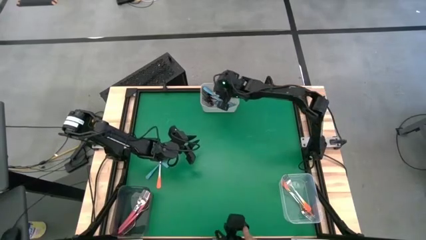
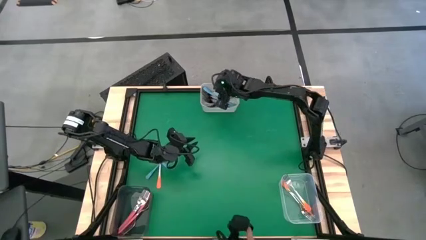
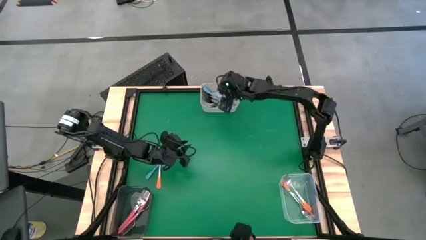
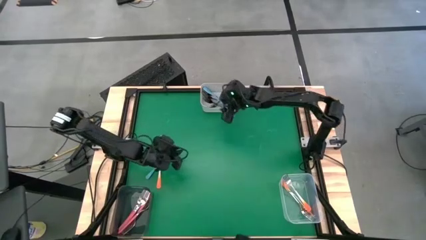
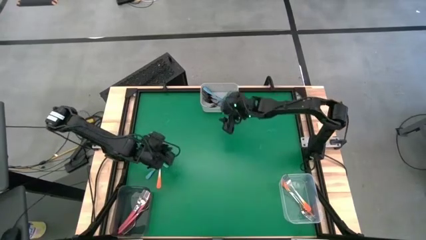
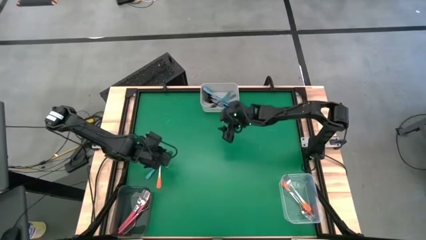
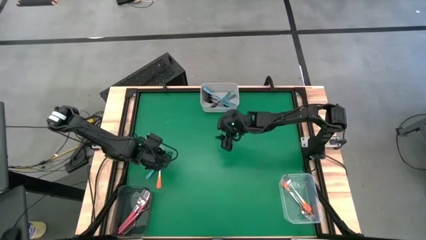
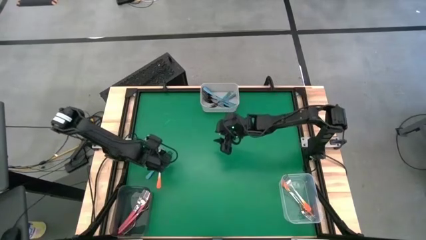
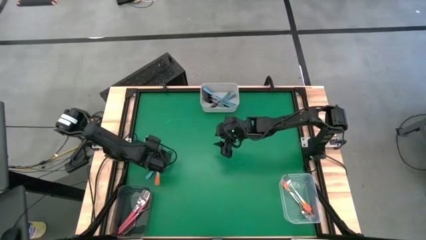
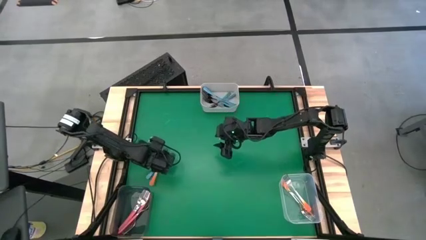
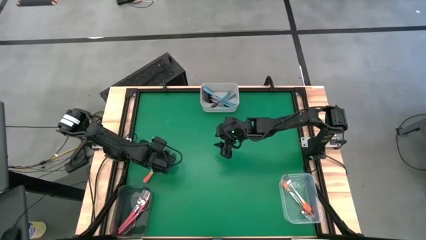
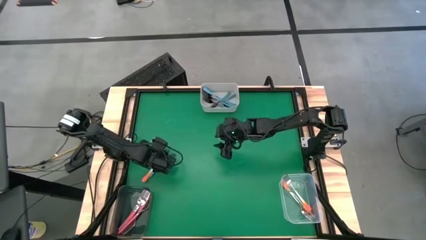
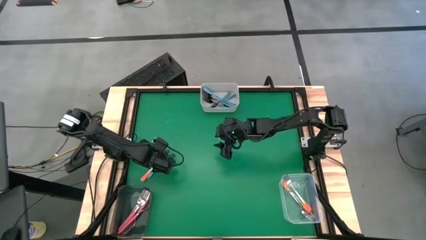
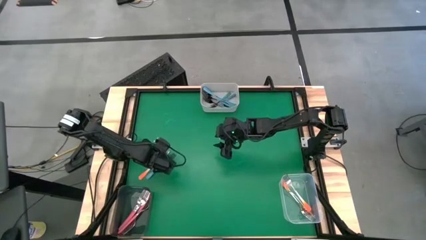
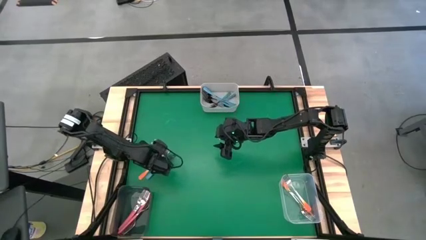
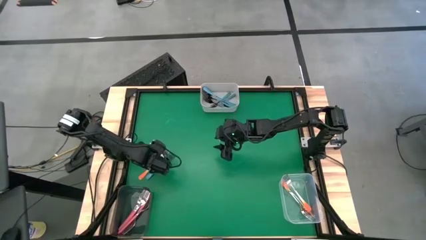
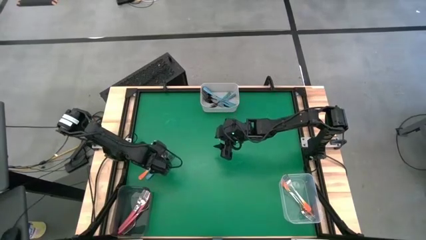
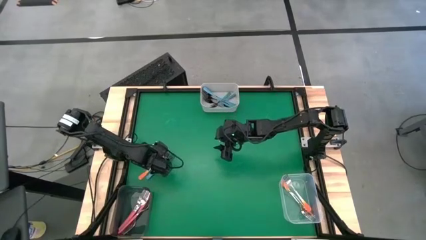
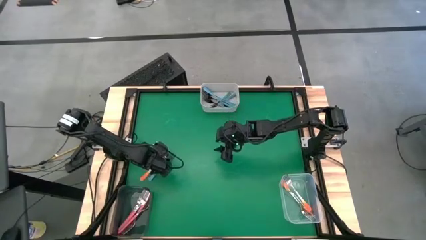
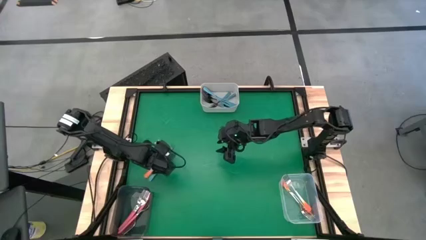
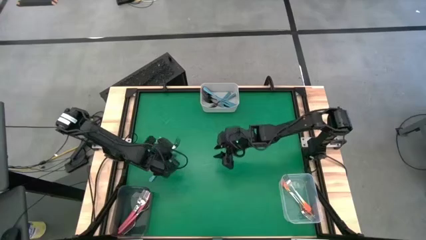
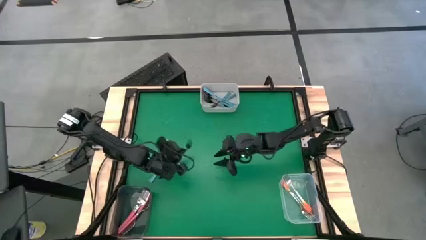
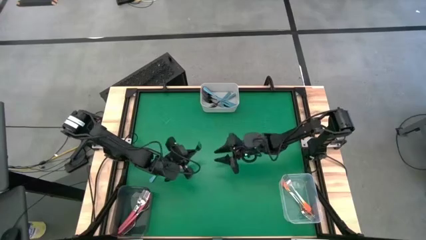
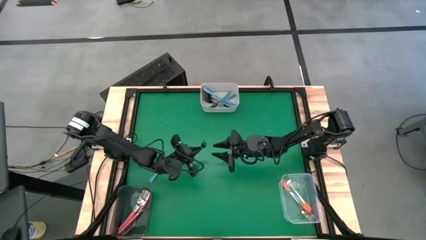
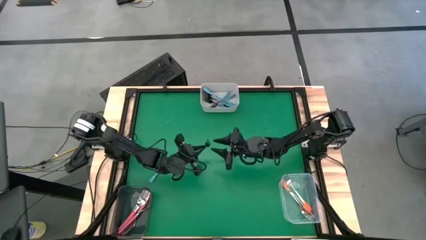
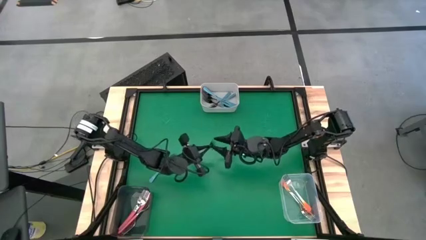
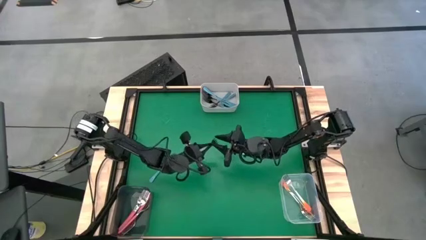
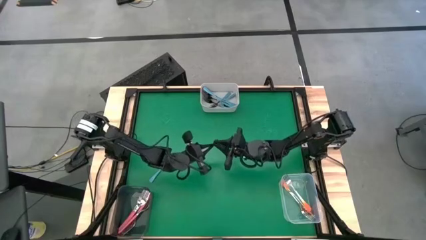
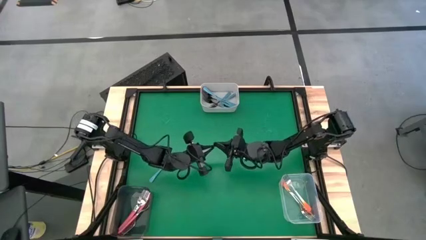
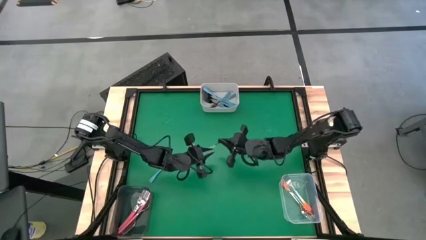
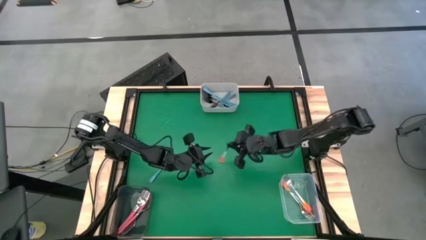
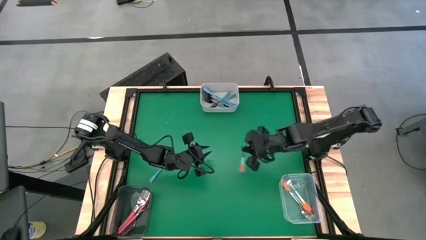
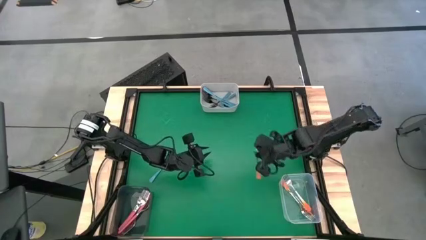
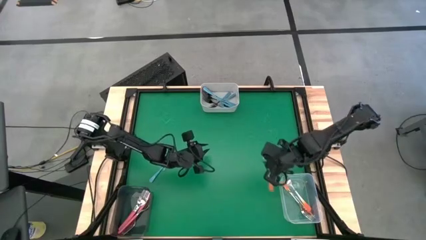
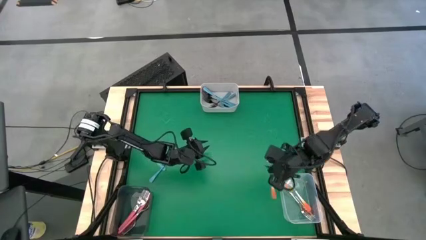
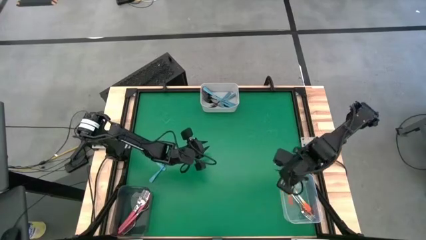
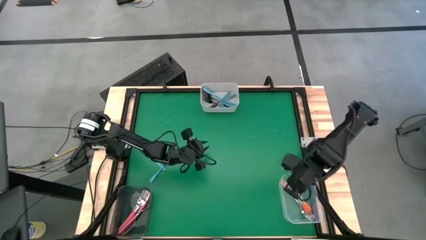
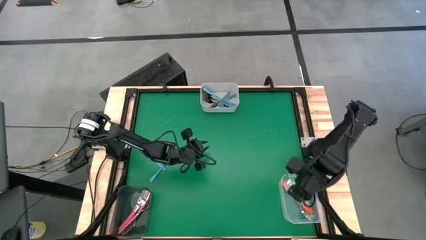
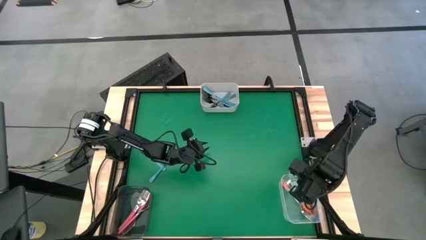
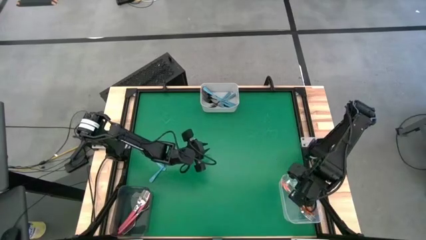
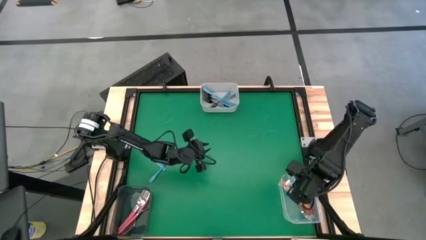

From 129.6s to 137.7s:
Task: Sort silverware by color (type)
Put the orange fork into the transparent bin

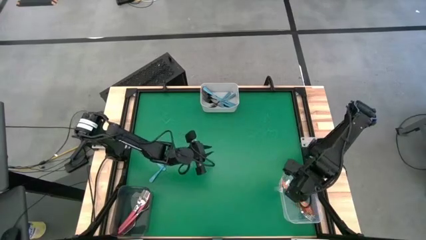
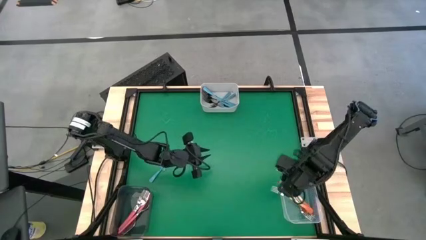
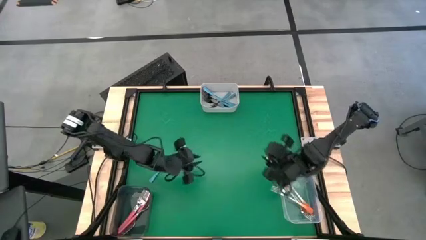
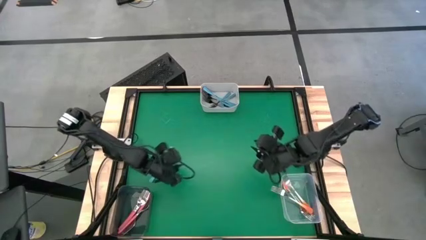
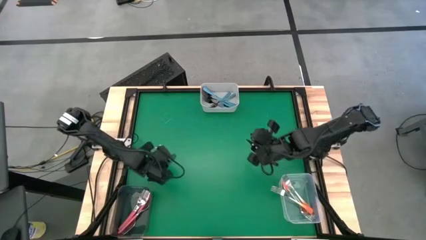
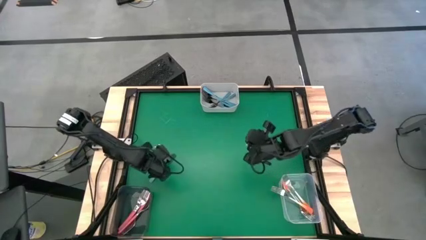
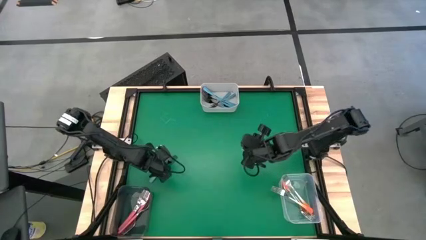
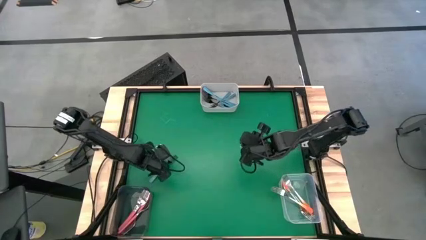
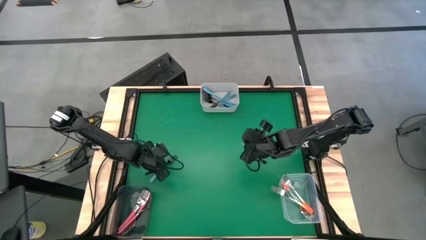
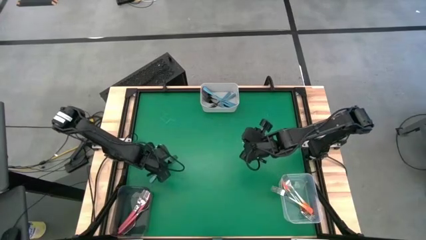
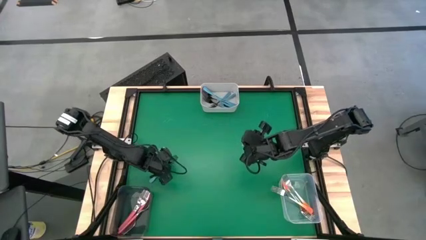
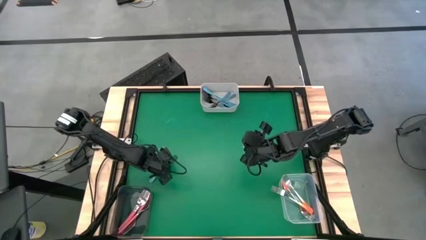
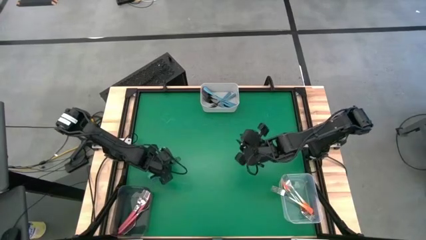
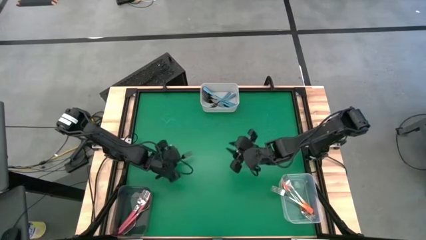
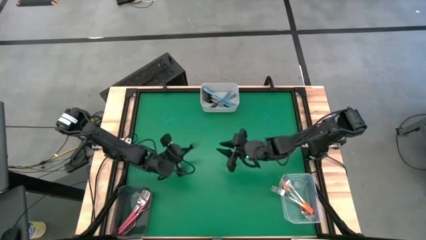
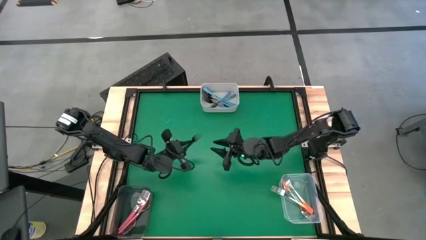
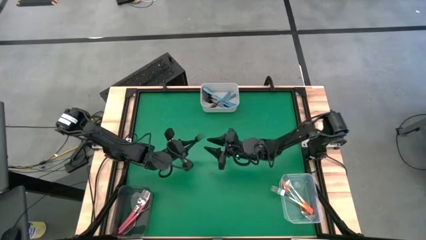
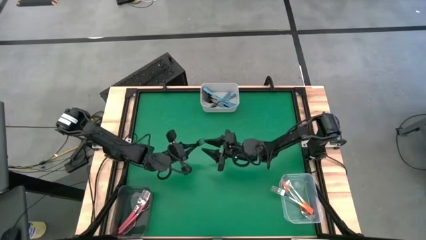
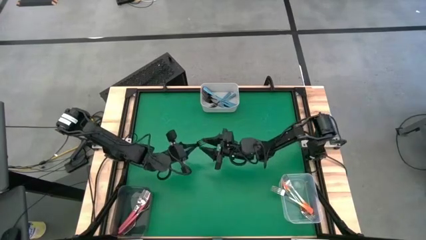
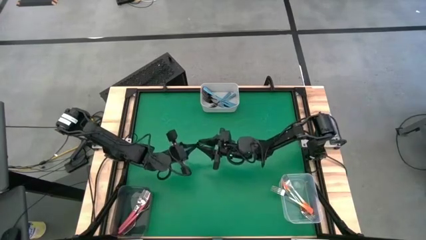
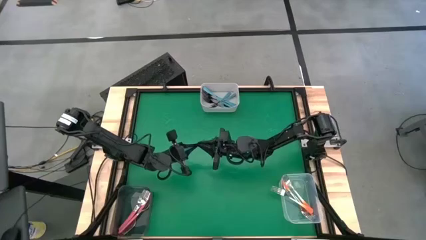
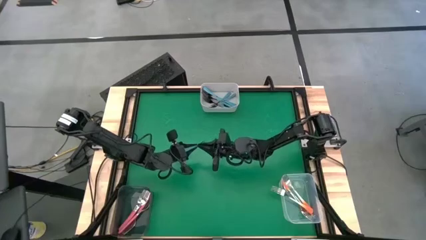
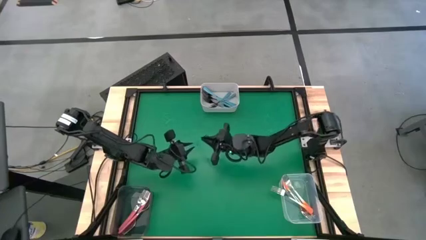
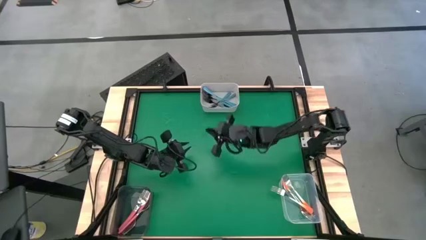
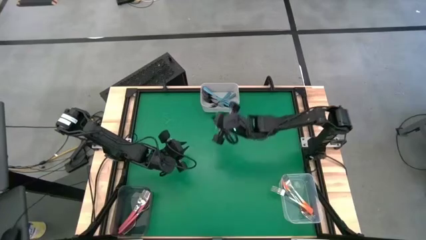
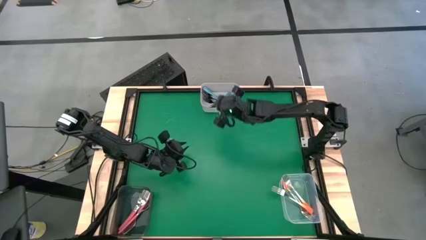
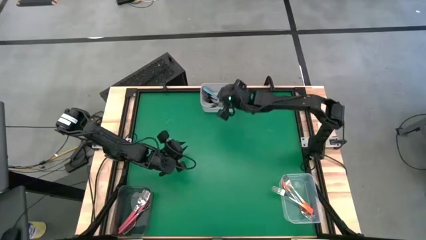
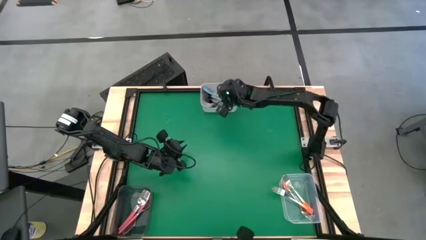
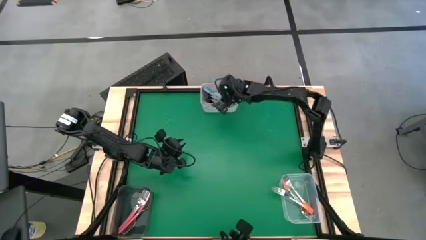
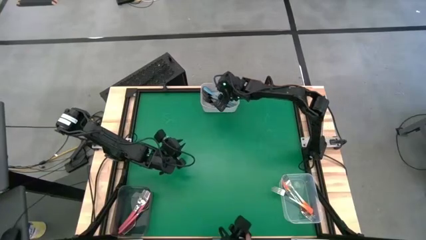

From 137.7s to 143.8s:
Put the blue fork into the white bin

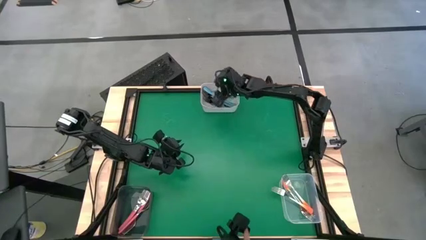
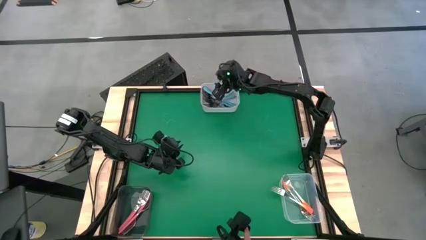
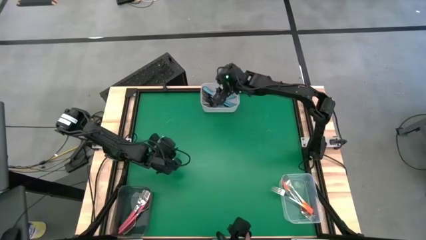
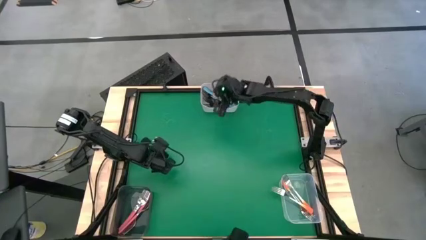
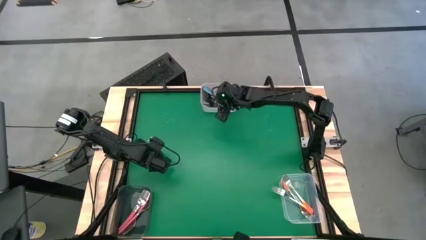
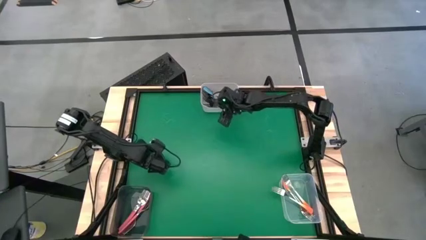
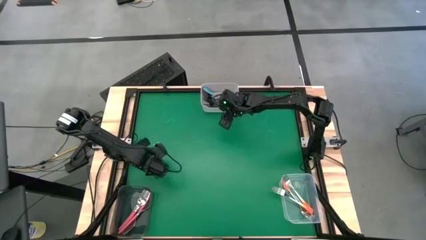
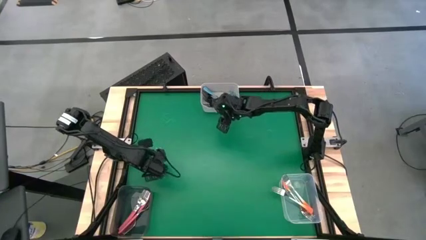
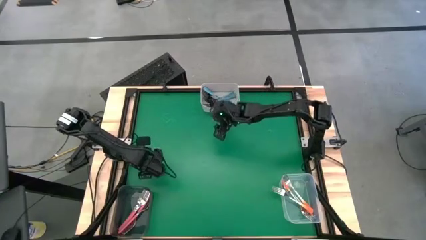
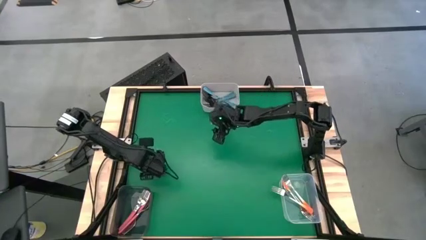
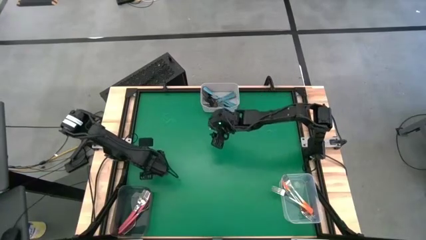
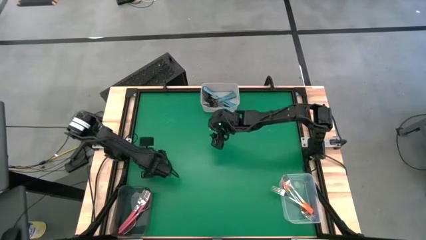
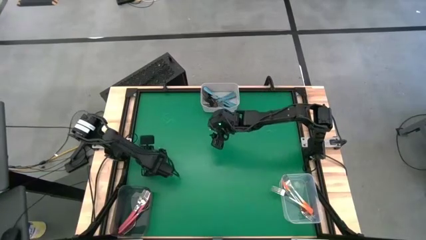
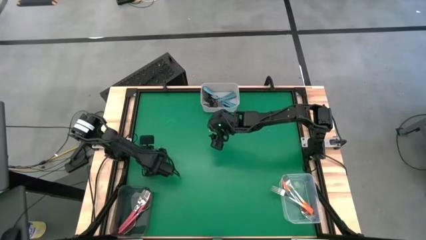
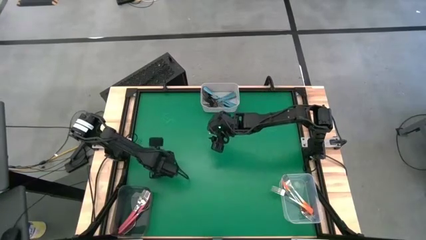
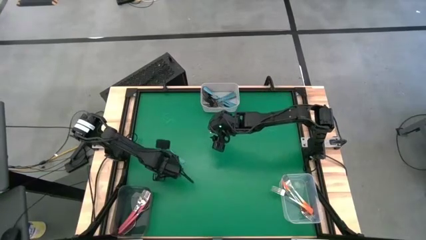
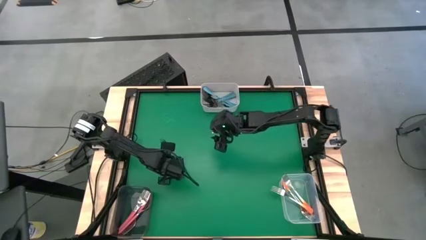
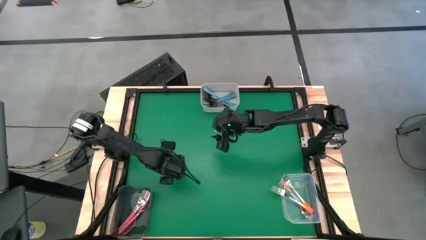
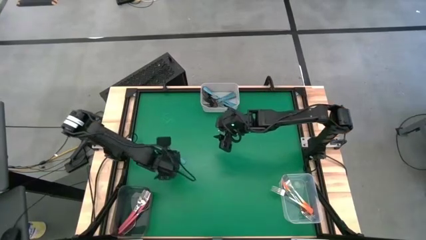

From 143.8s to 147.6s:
Put the blue fork into the white bin
